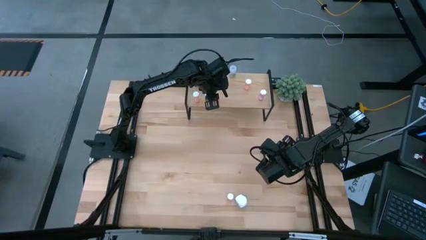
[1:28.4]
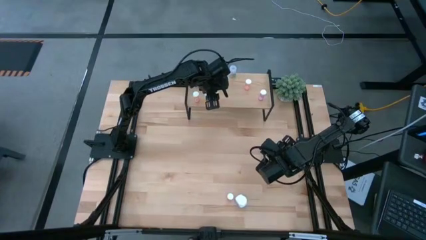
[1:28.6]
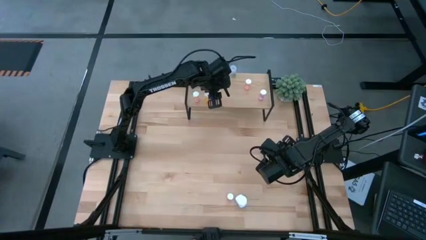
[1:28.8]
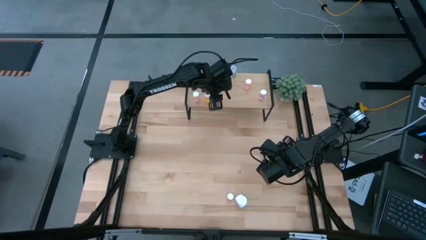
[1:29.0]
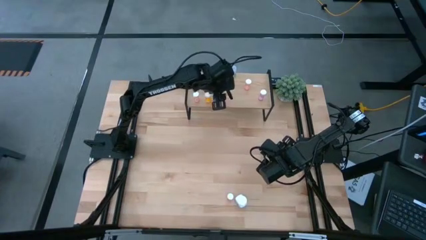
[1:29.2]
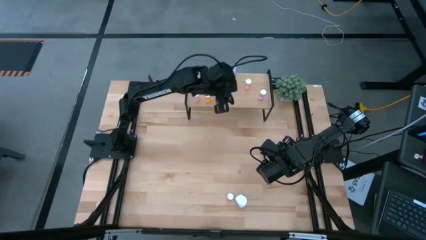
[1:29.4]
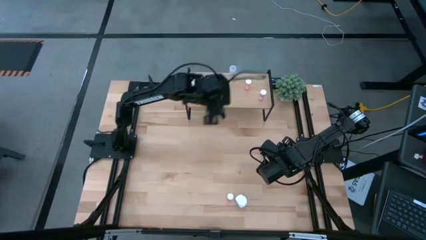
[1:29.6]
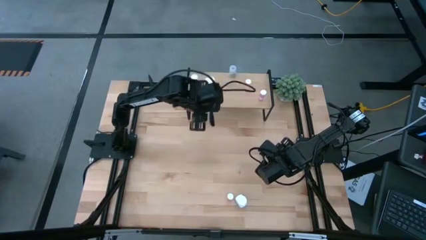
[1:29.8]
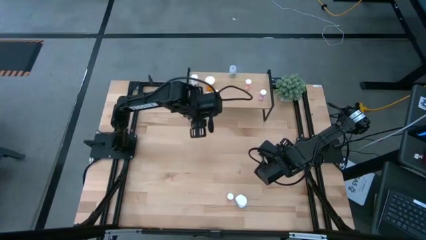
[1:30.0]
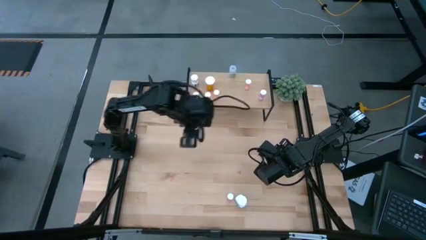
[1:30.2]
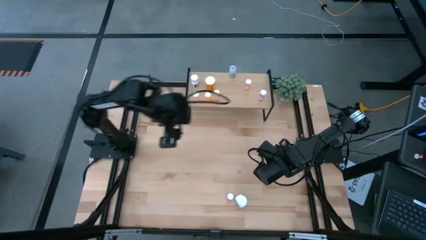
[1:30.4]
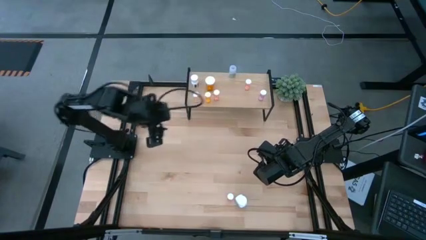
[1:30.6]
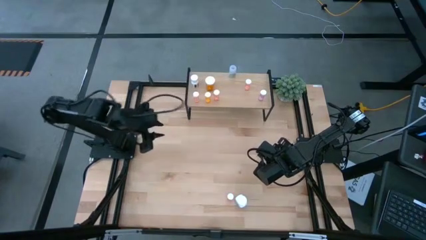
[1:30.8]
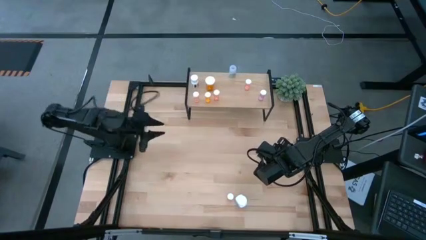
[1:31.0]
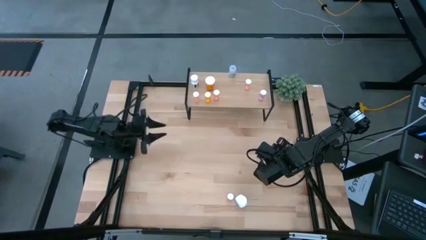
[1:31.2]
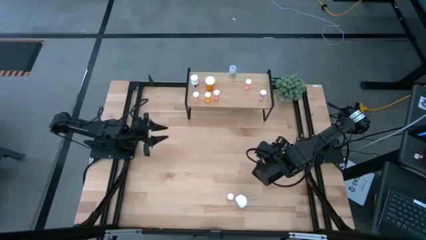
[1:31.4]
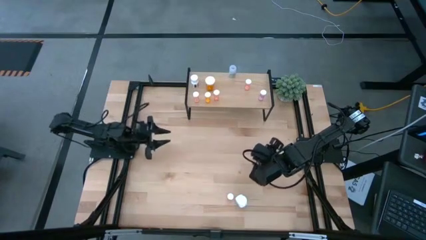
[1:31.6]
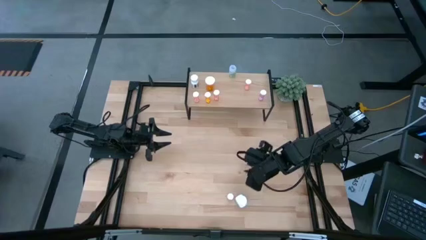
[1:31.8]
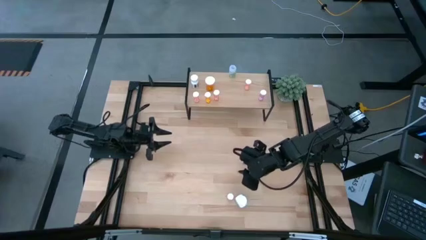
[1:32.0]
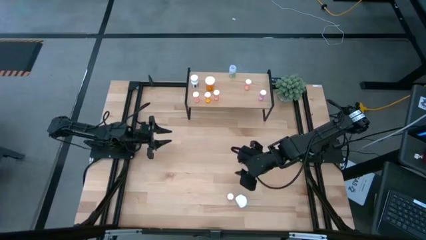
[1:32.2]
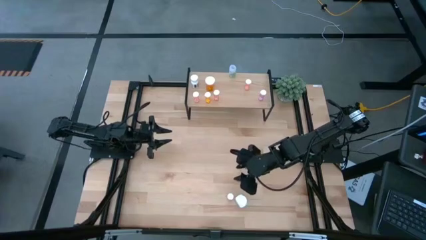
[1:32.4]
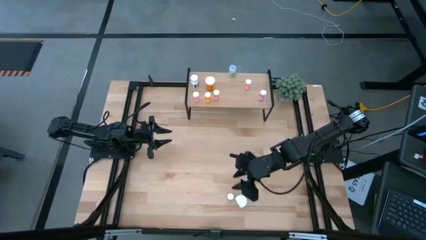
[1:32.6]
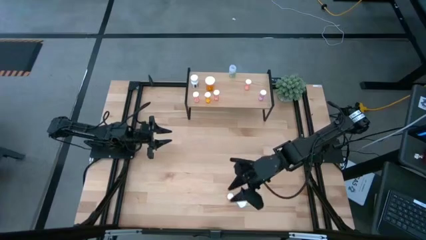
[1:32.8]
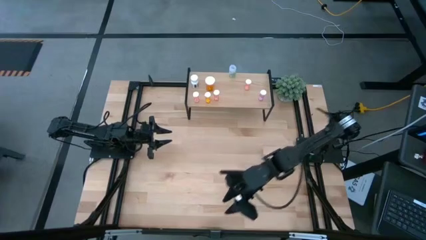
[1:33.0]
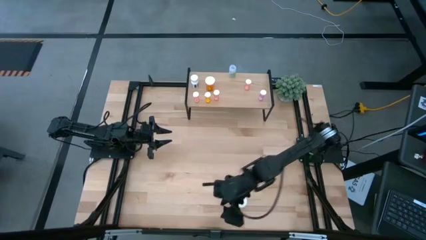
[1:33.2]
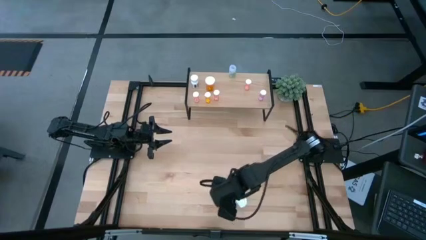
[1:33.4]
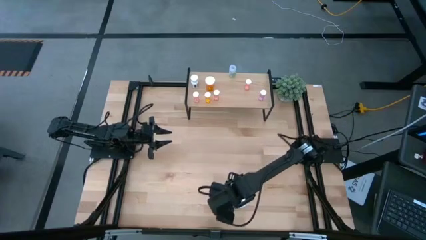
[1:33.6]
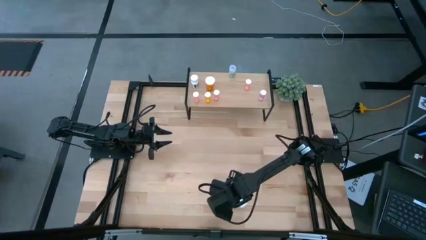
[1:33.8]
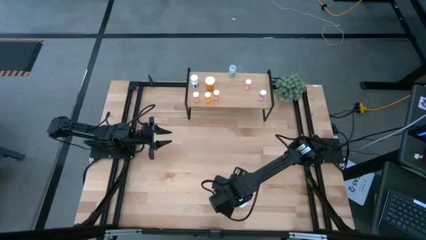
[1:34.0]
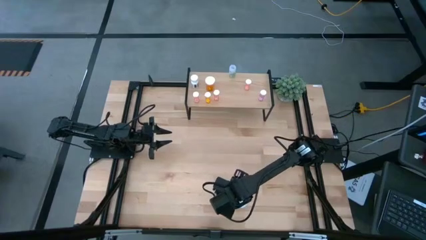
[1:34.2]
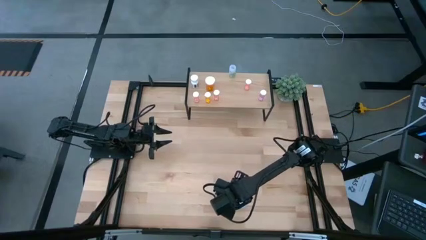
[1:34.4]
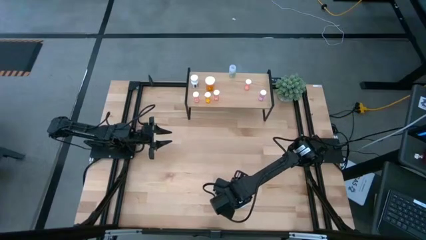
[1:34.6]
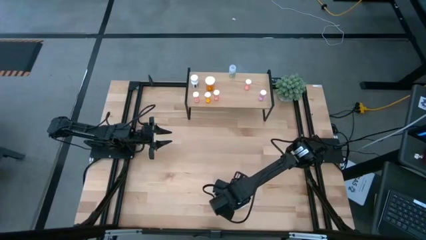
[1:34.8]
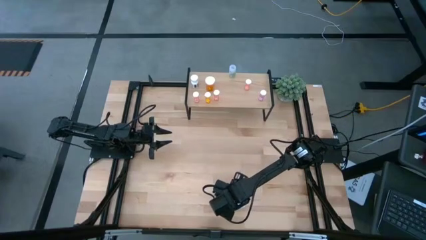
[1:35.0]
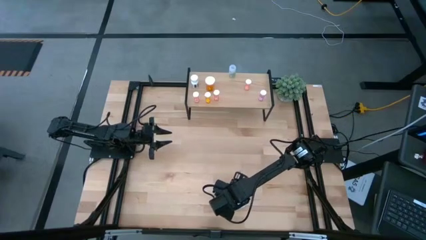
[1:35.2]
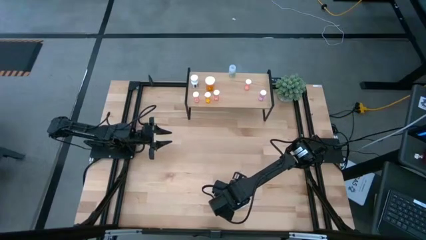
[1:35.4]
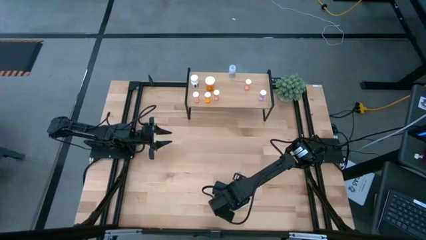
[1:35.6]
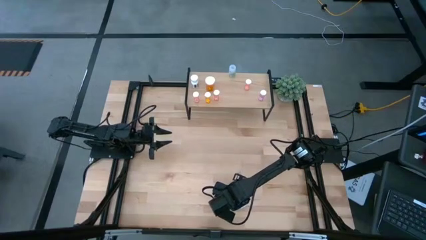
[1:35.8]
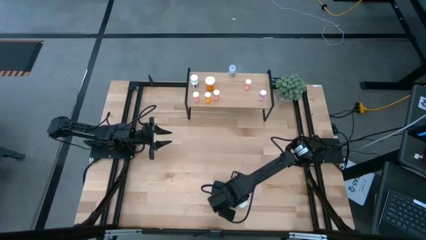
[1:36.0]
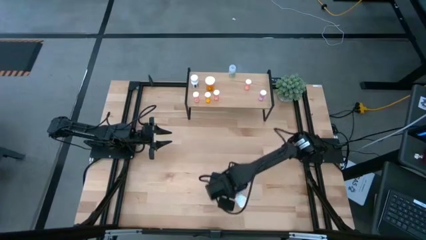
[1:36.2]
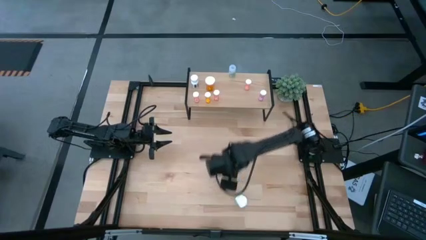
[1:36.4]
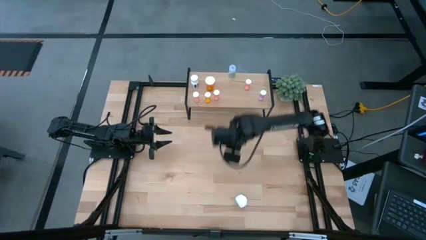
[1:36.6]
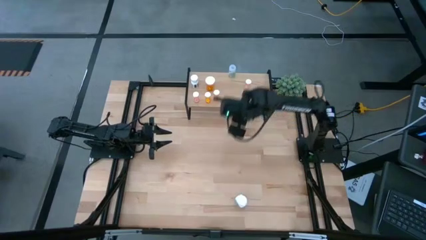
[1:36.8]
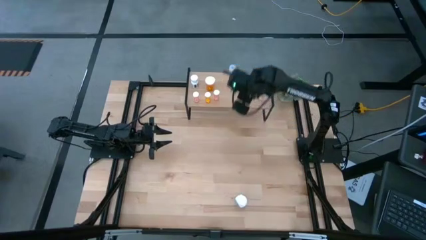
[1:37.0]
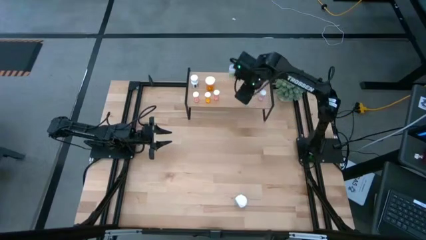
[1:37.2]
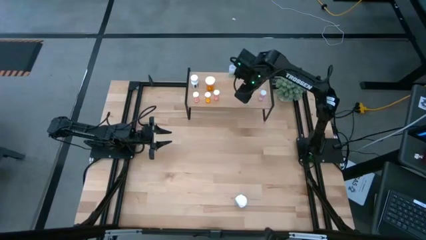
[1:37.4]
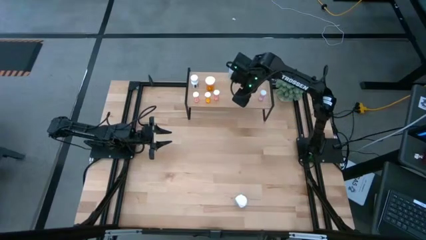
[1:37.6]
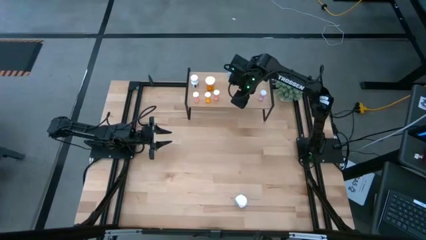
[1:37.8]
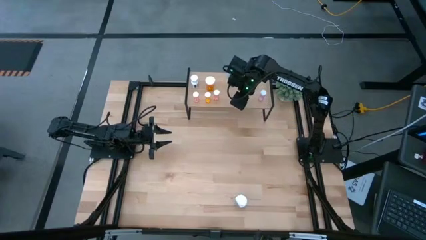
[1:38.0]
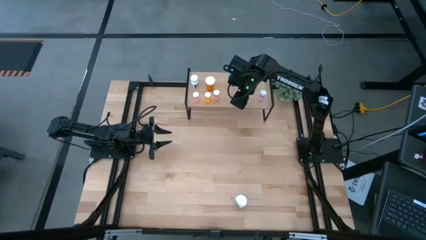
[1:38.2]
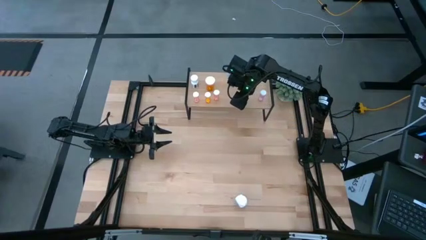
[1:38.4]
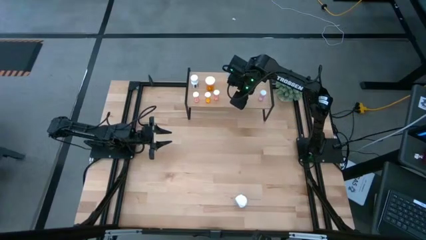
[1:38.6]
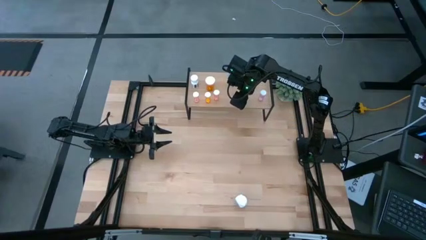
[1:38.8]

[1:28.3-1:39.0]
Task: Pick and place medicine bottles onto shelf by color
Put the pink pill bottle on the shelf

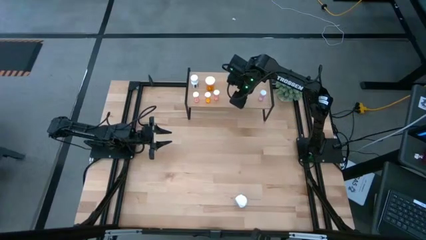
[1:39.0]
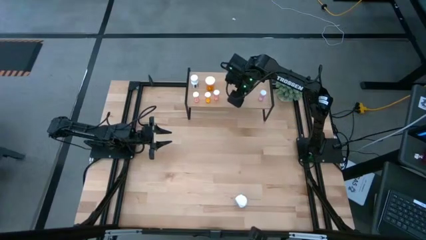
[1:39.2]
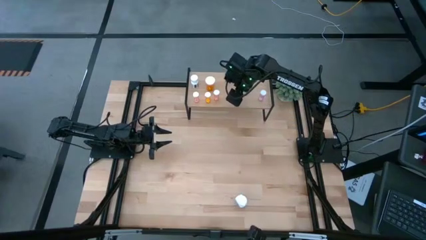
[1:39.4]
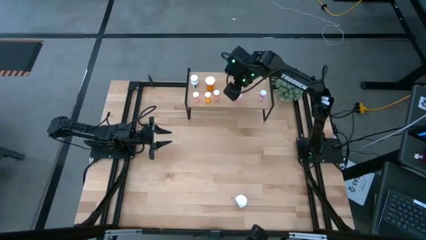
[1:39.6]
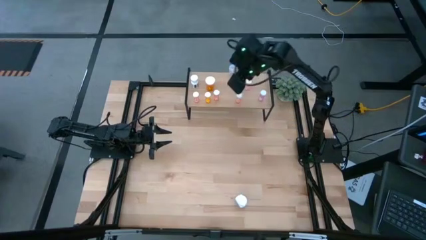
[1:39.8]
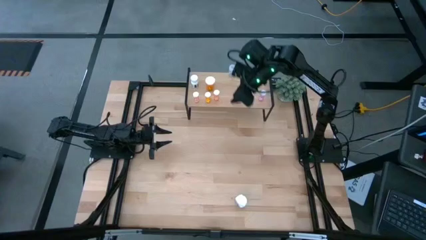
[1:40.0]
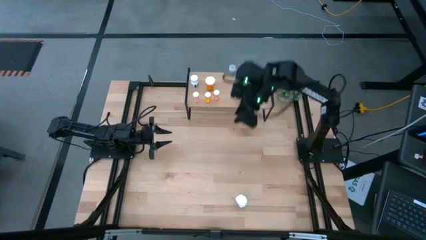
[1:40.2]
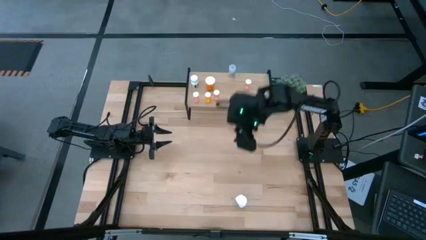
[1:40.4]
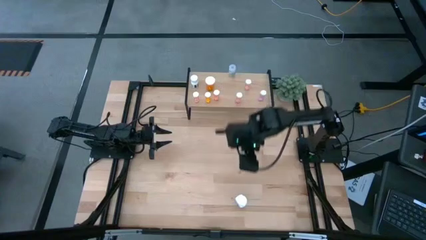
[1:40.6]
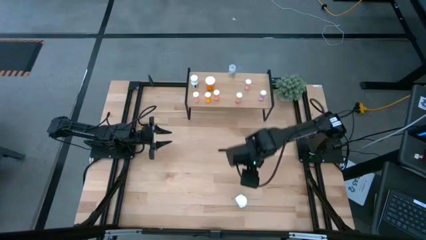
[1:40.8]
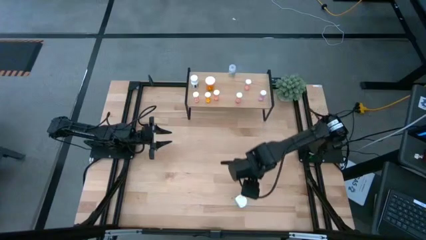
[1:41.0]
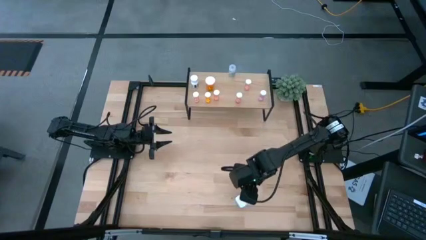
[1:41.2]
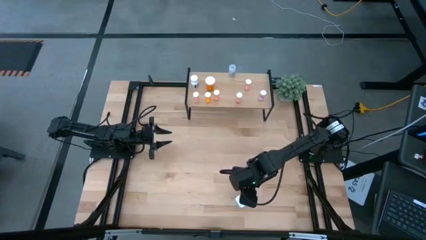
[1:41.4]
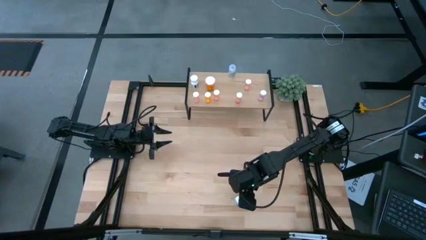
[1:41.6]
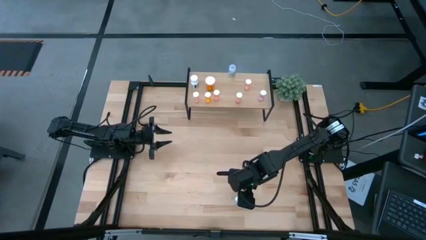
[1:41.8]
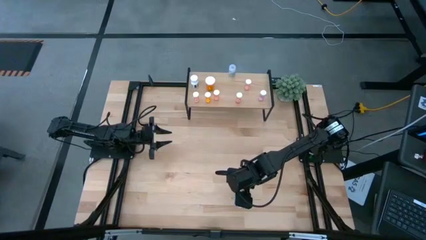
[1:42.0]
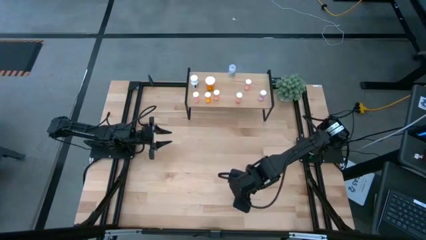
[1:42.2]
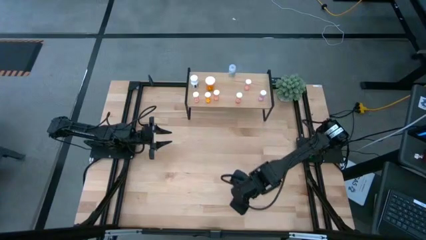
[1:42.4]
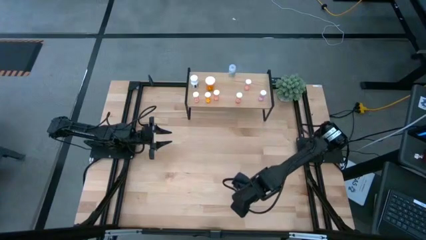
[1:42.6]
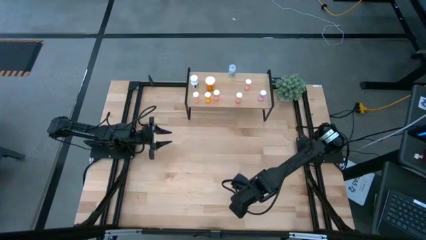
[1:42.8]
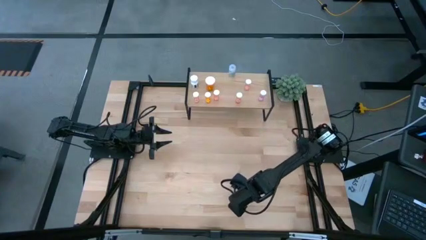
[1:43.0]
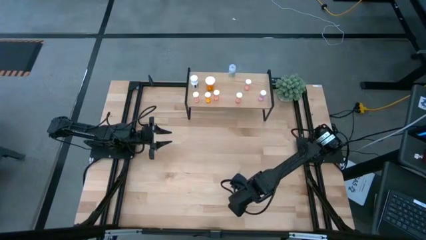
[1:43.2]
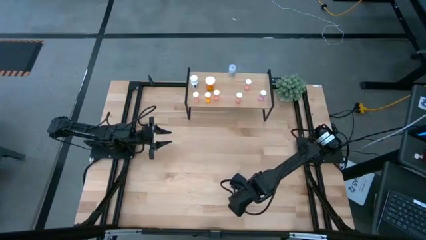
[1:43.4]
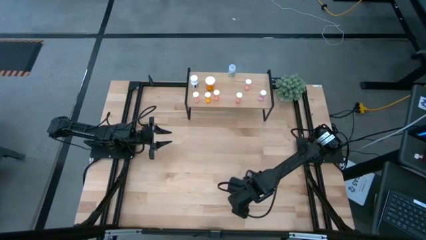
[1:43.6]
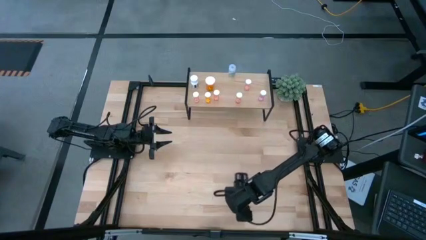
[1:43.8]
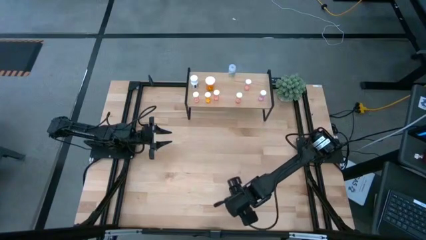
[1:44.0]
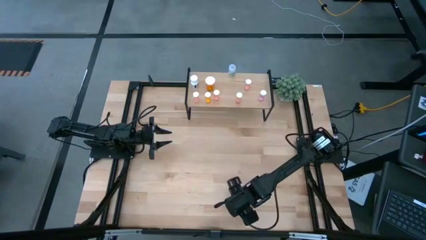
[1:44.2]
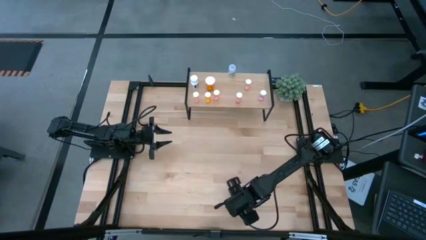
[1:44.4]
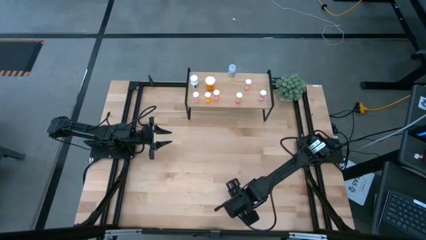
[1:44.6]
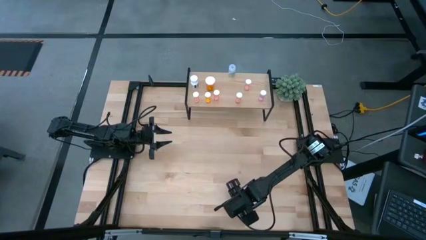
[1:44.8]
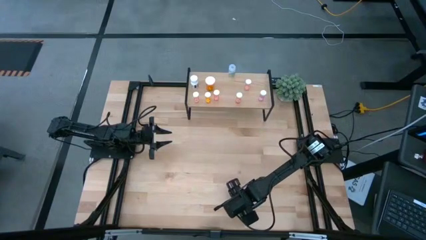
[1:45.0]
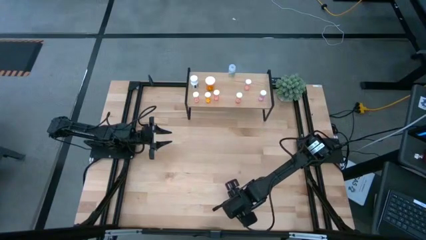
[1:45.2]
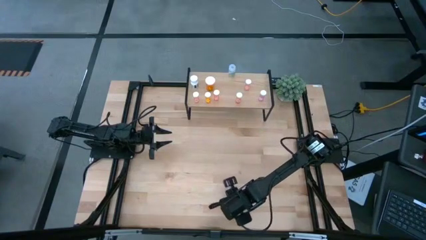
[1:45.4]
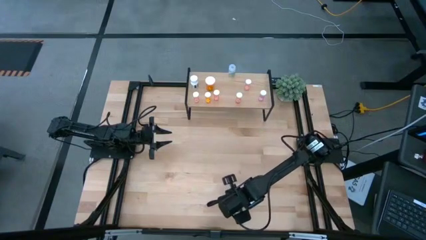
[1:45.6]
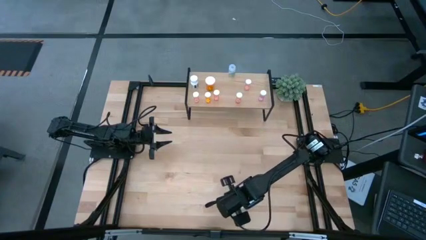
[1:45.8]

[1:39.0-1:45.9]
Put the big white pill bottle on the shelf
